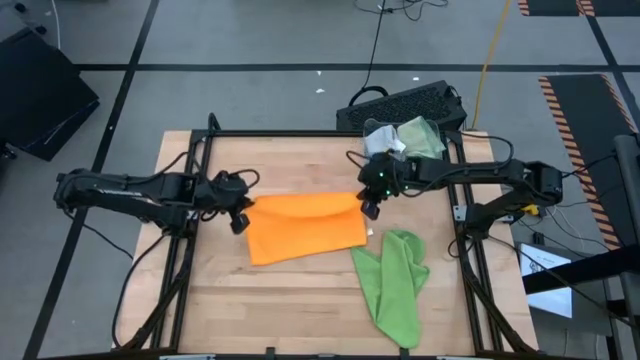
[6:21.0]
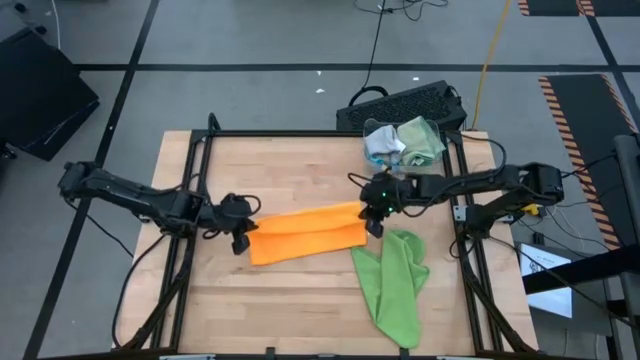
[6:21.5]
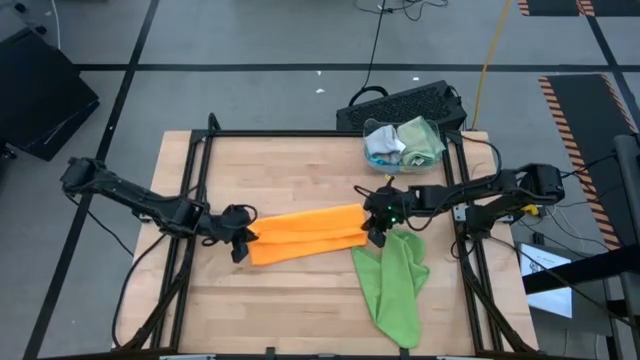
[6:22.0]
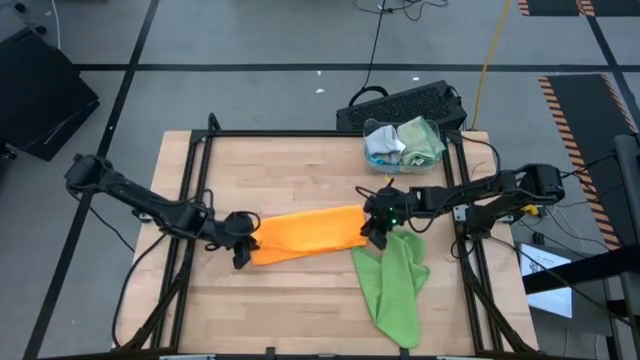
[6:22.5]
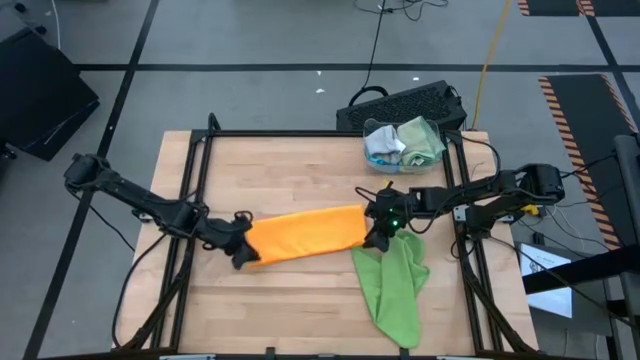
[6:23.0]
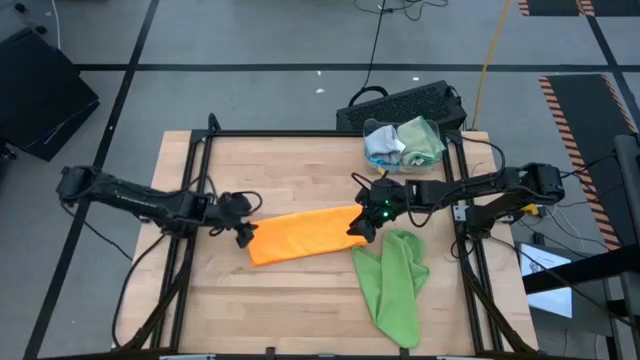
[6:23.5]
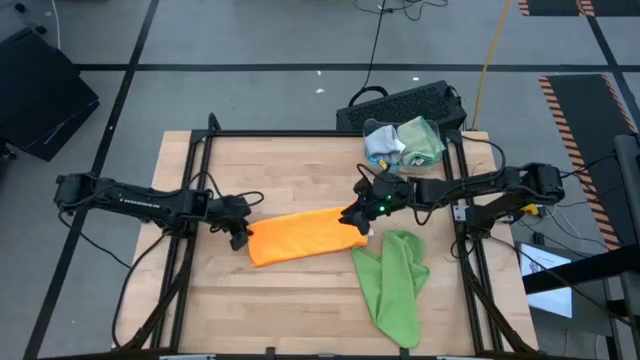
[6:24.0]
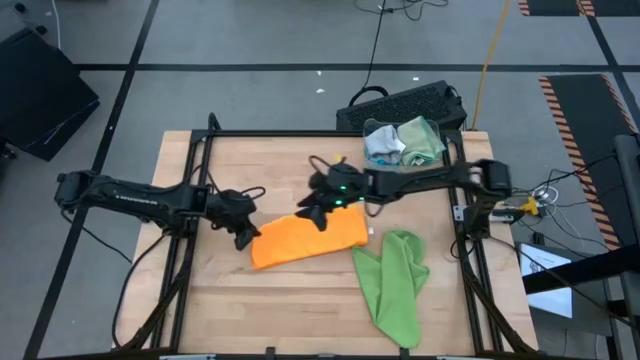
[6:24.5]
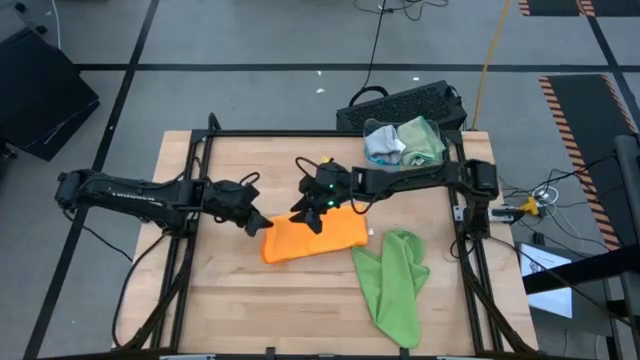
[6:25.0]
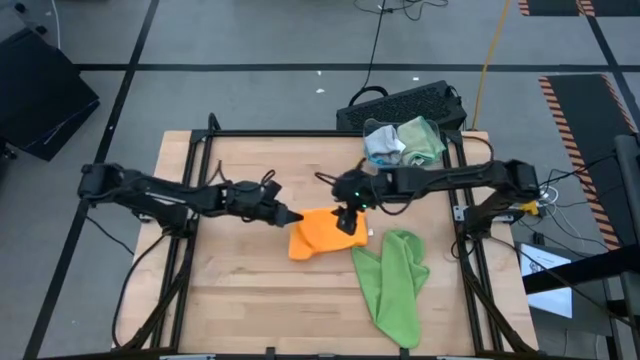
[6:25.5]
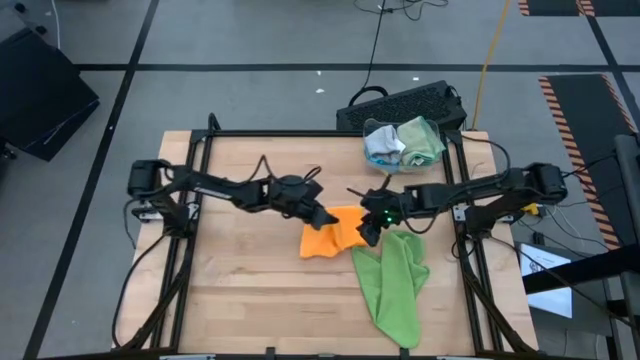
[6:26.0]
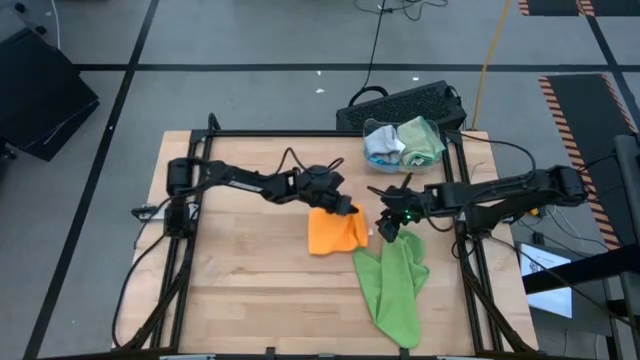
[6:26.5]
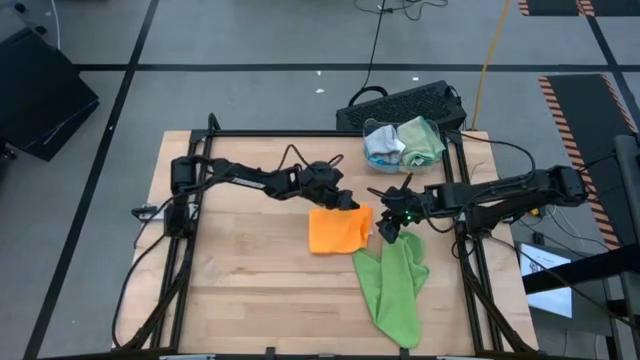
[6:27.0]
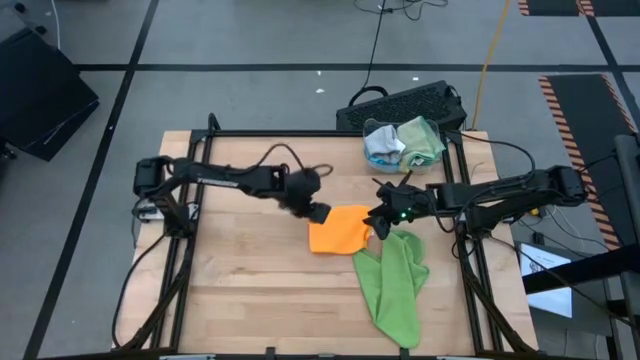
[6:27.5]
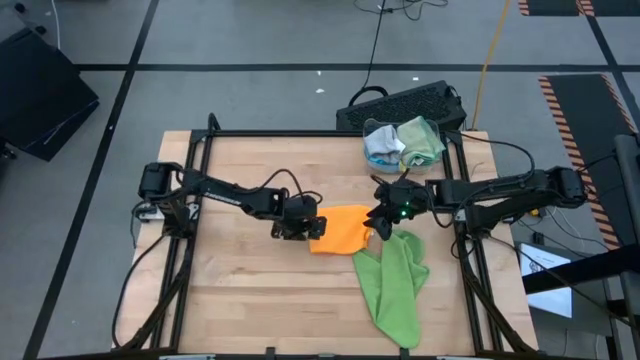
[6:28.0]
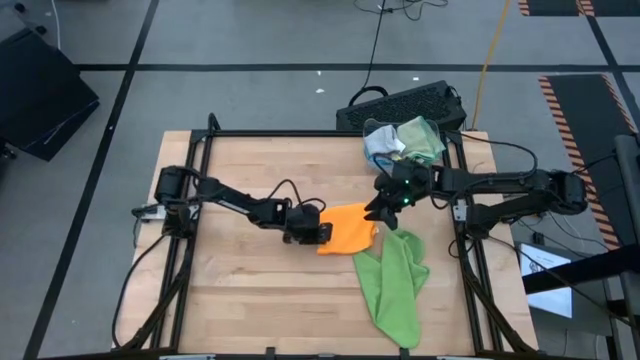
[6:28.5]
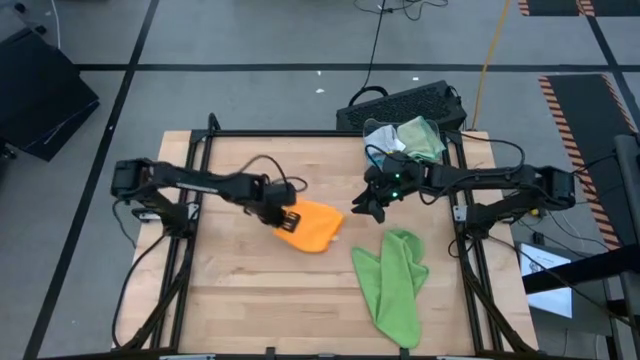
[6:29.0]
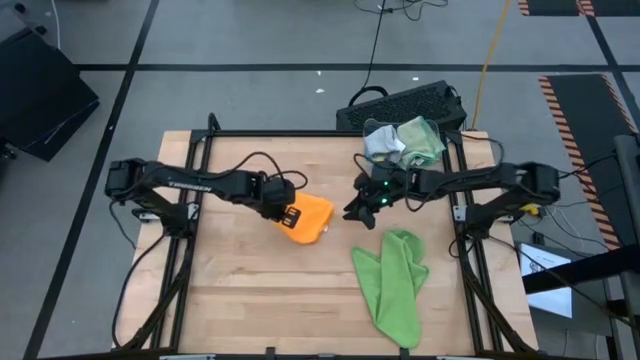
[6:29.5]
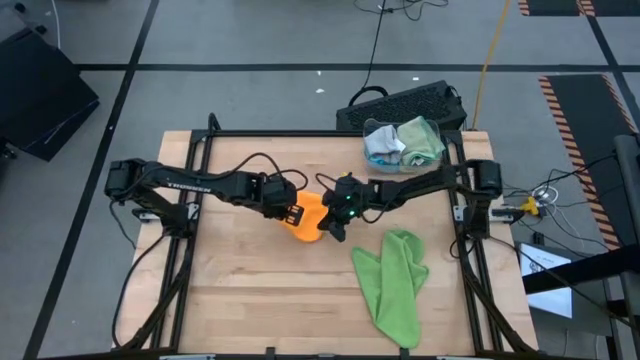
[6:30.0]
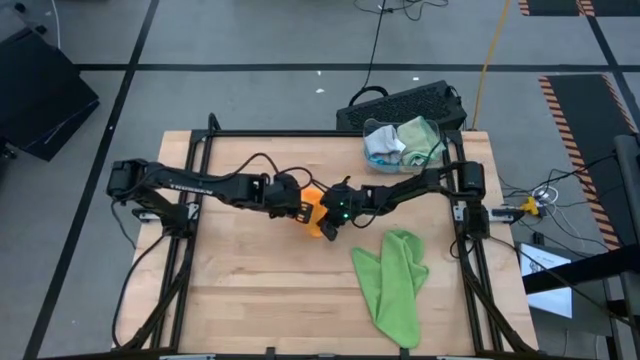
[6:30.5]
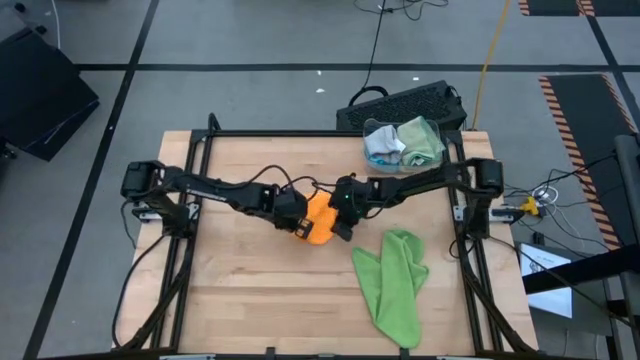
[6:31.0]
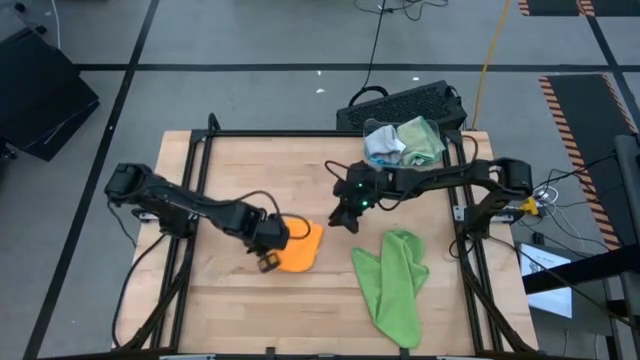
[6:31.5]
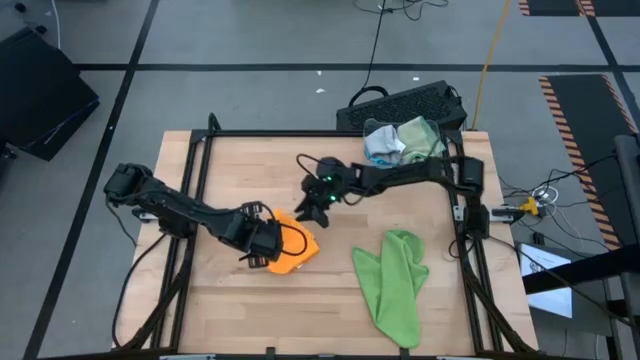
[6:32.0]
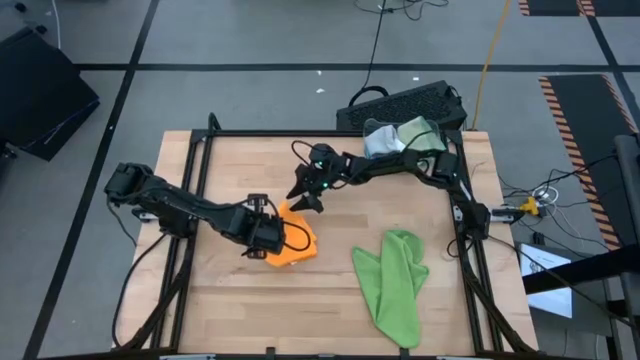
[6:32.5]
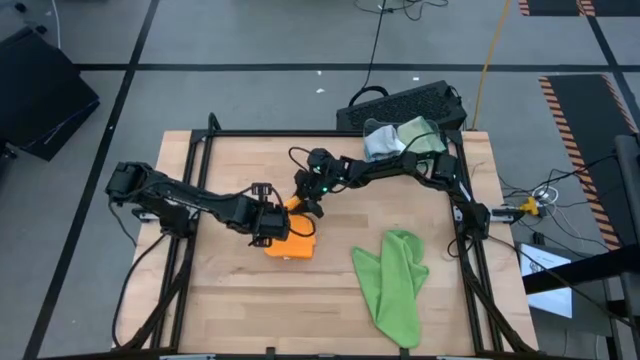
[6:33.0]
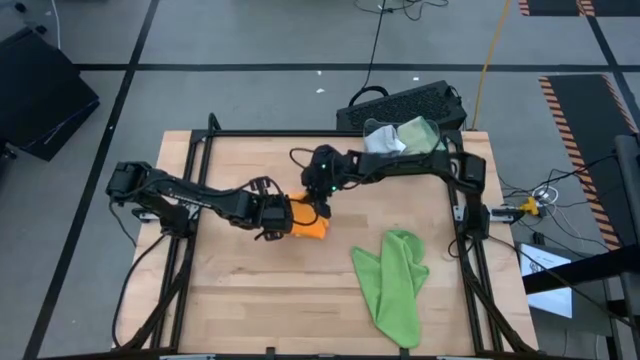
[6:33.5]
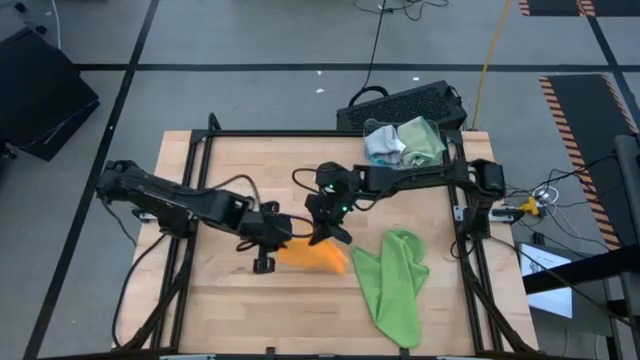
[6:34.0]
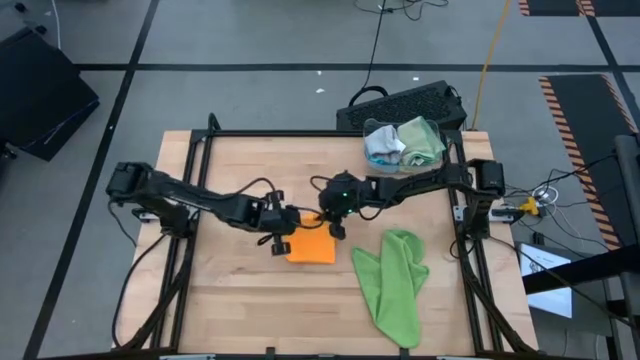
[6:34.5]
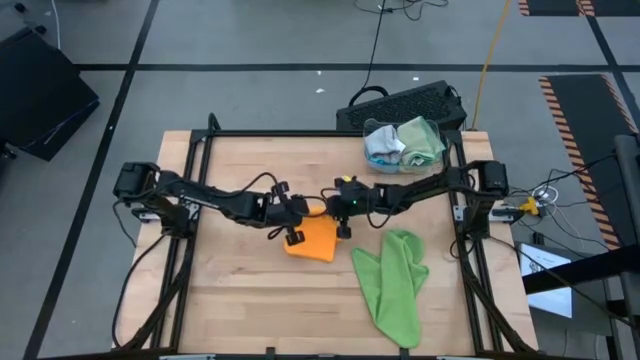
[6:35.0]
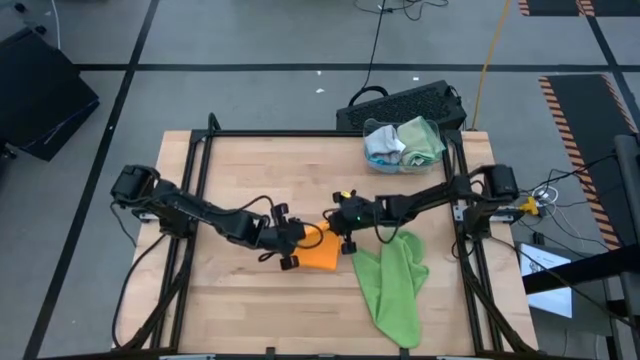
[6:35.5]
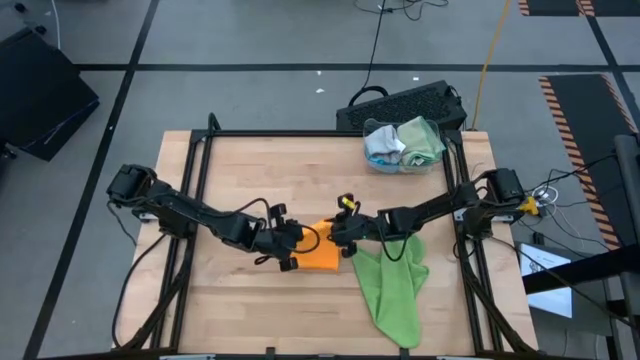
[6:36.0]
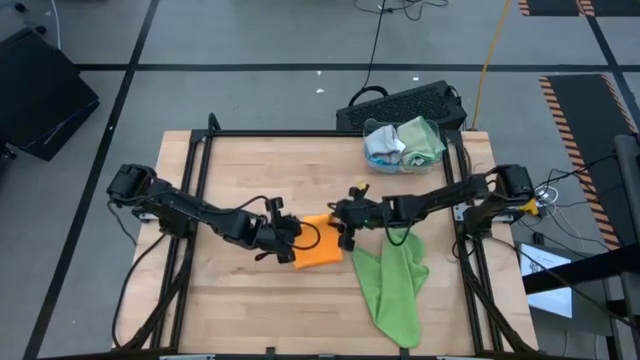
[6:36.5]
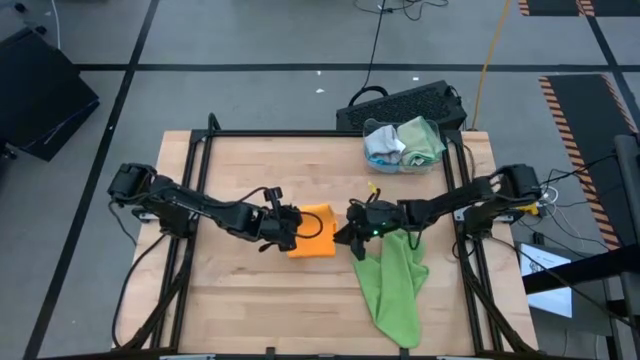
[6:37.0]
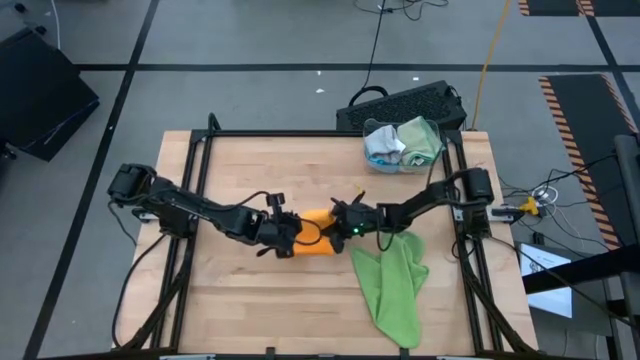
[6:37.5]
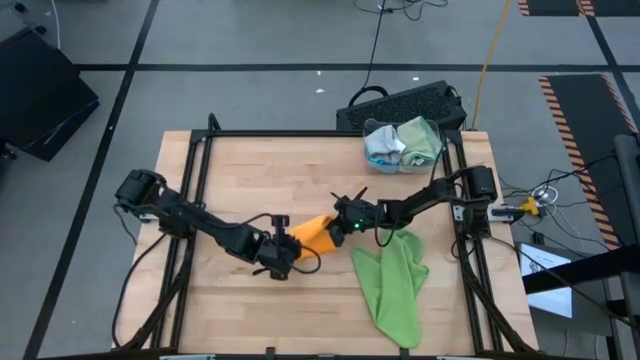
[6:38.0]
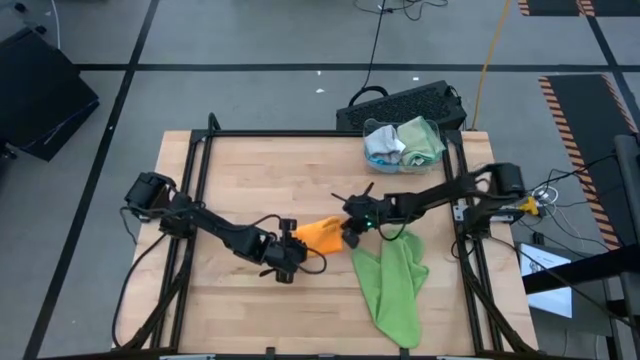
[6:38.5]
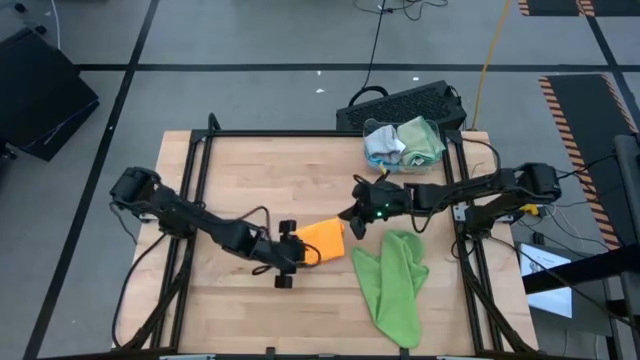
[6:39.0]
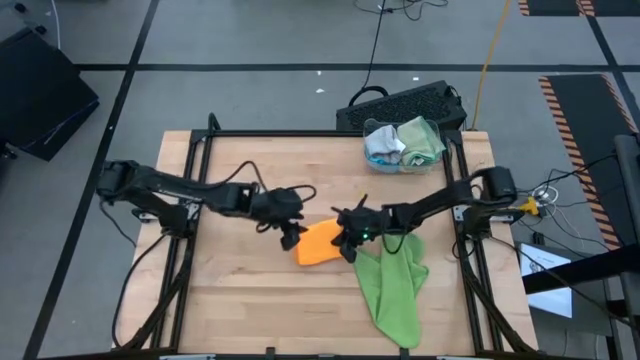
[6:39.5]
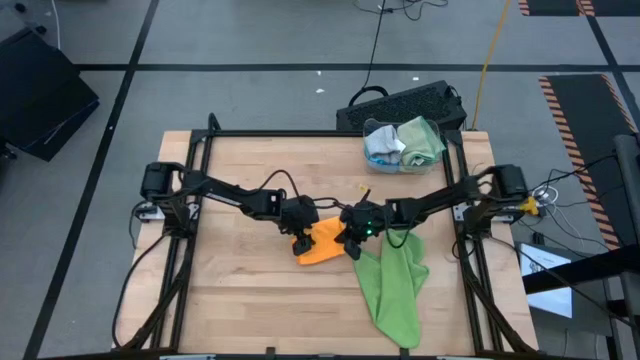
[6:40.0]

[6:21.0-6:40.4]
Task: Fold microfiber towels
Fold the yellow microfiber towel
